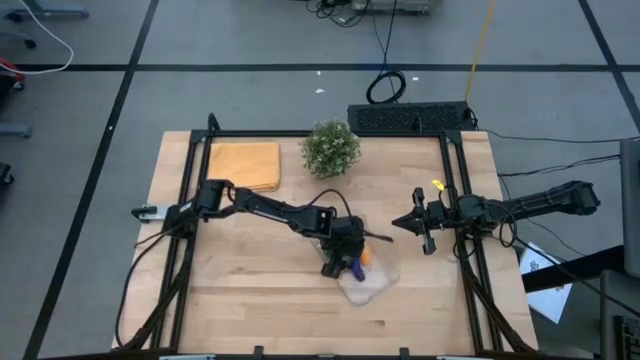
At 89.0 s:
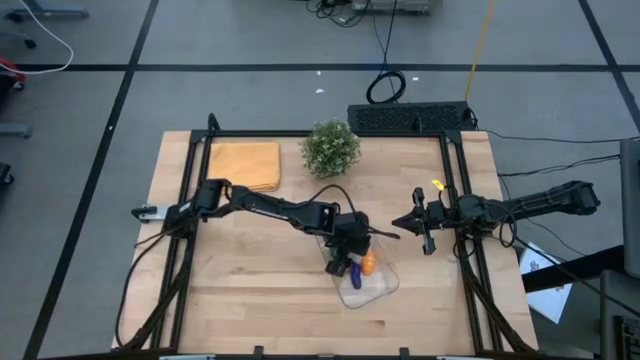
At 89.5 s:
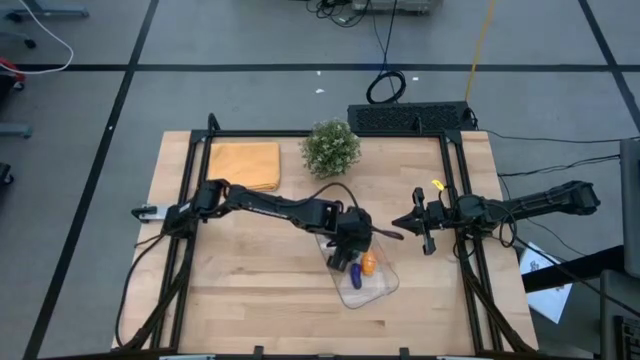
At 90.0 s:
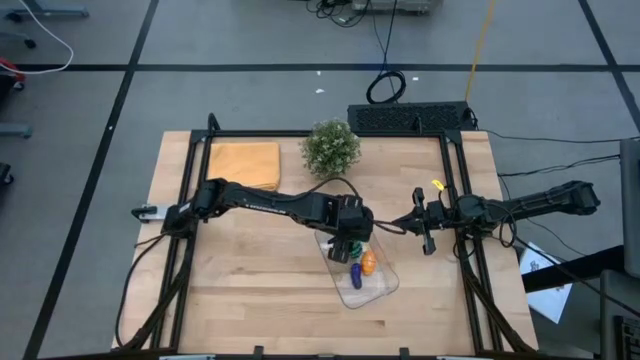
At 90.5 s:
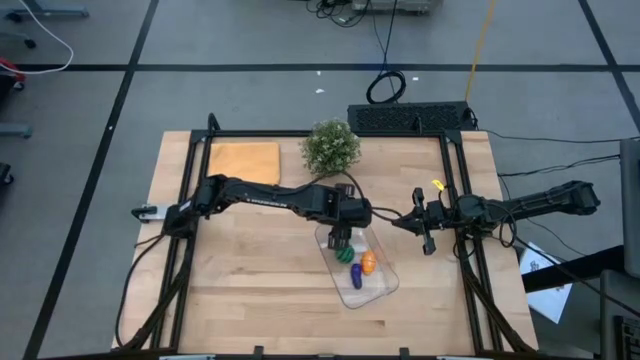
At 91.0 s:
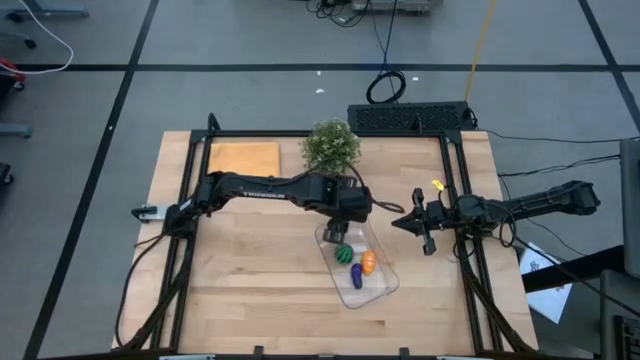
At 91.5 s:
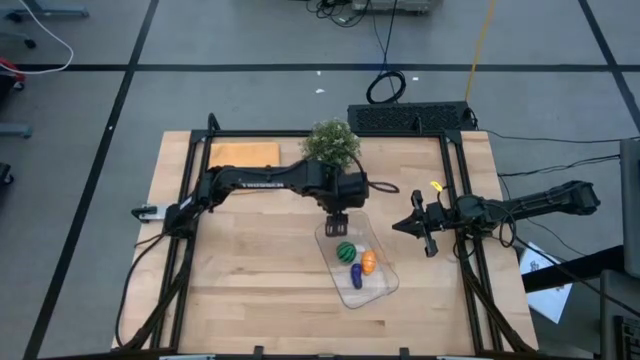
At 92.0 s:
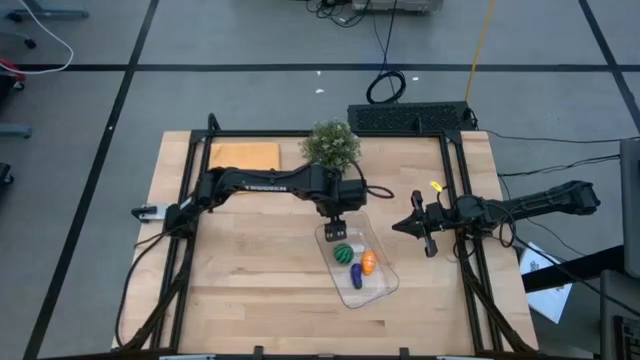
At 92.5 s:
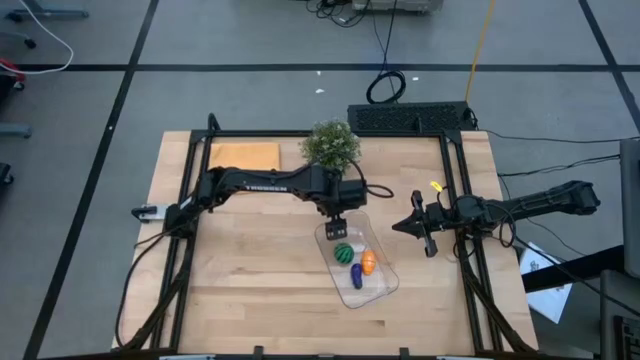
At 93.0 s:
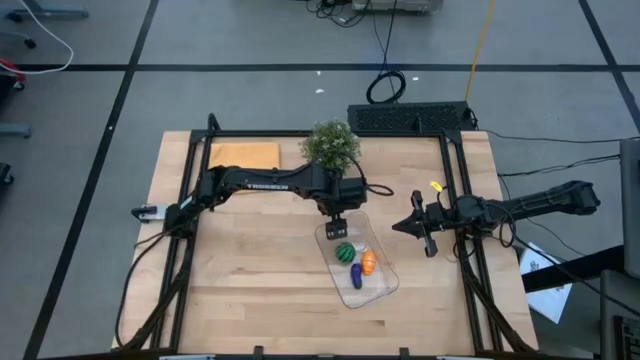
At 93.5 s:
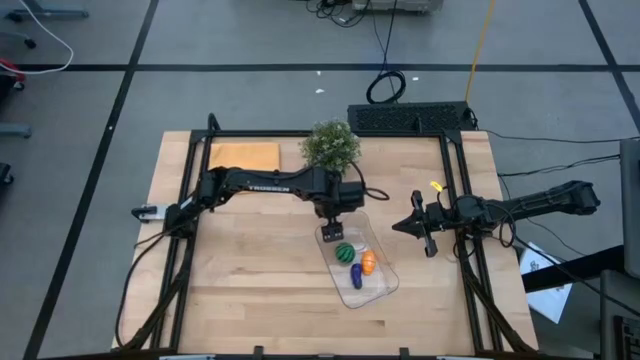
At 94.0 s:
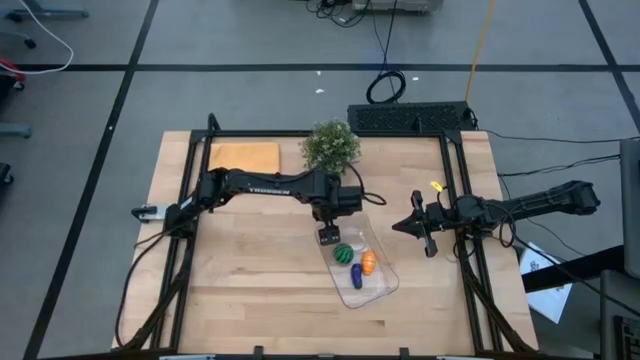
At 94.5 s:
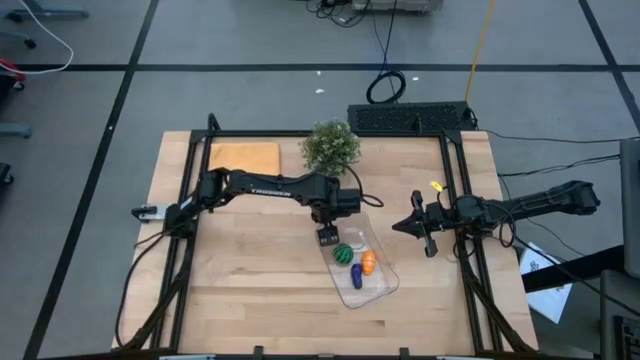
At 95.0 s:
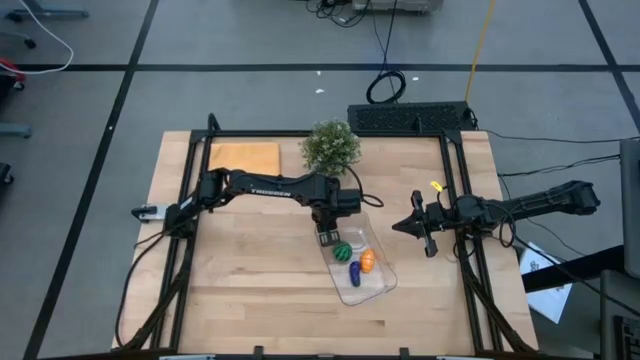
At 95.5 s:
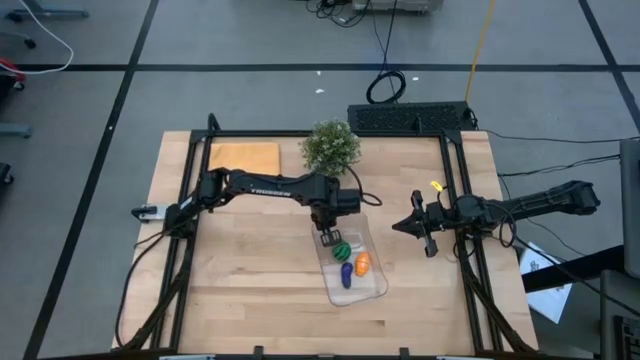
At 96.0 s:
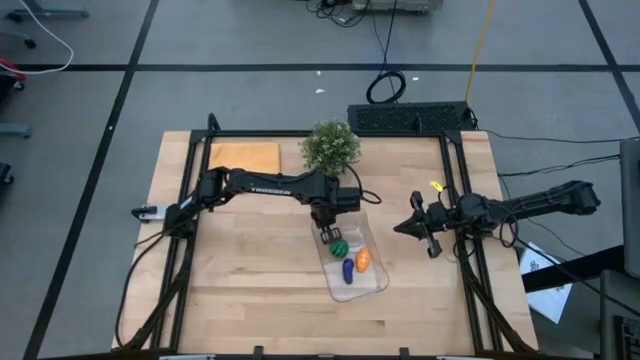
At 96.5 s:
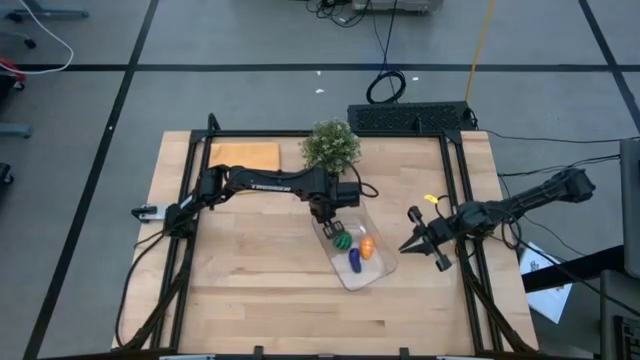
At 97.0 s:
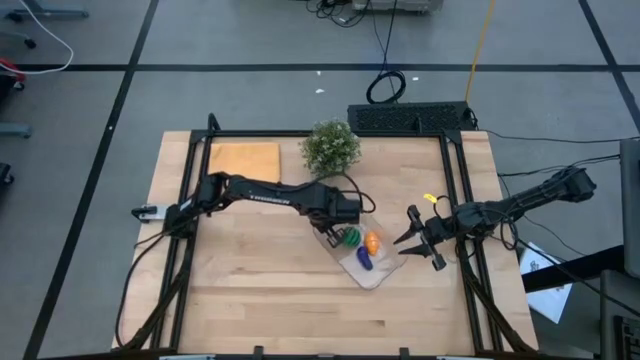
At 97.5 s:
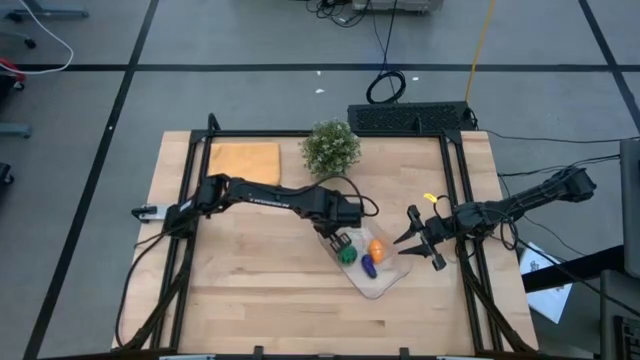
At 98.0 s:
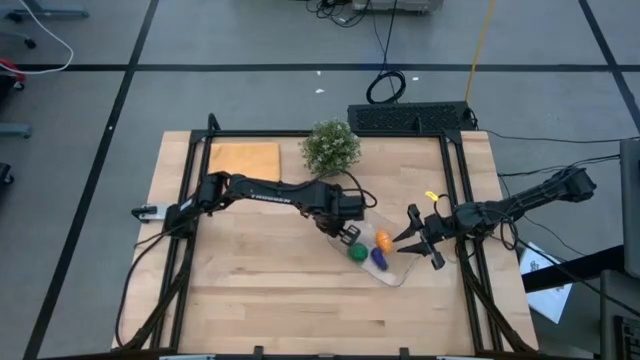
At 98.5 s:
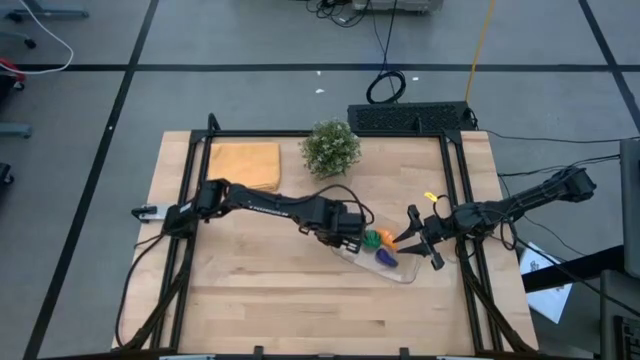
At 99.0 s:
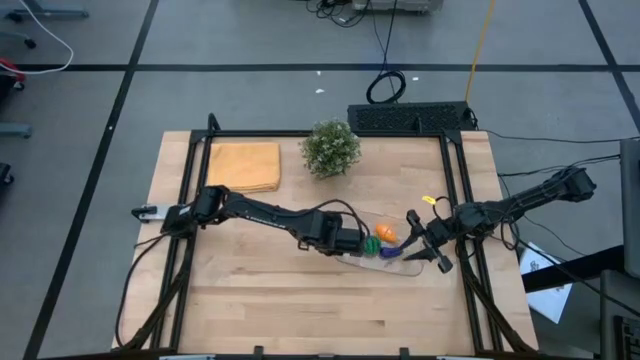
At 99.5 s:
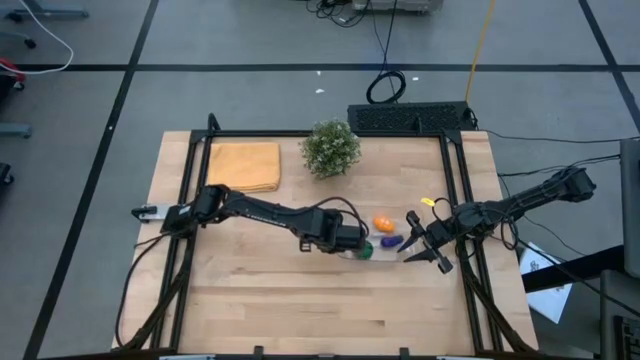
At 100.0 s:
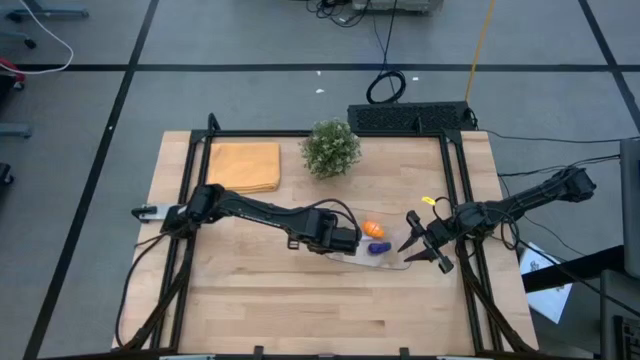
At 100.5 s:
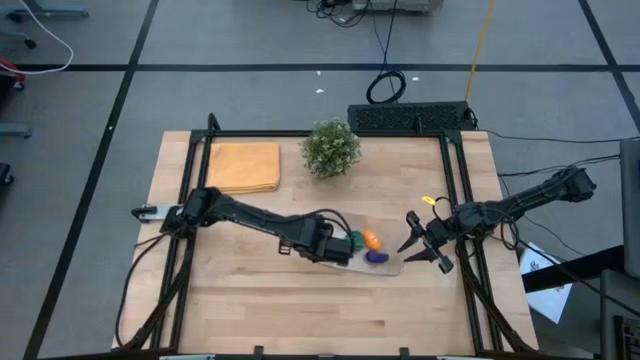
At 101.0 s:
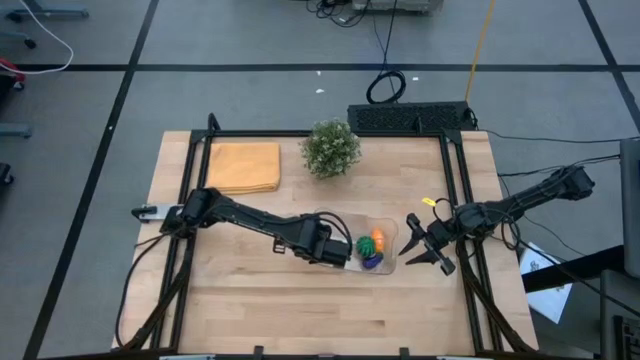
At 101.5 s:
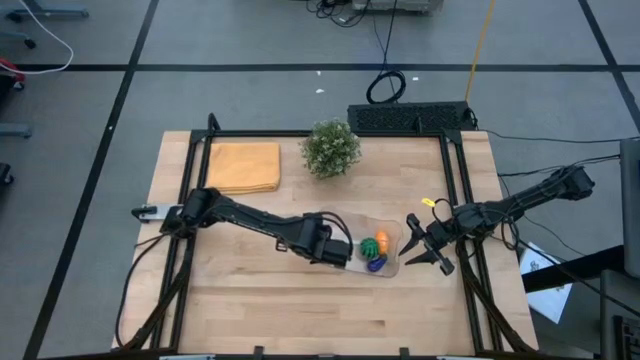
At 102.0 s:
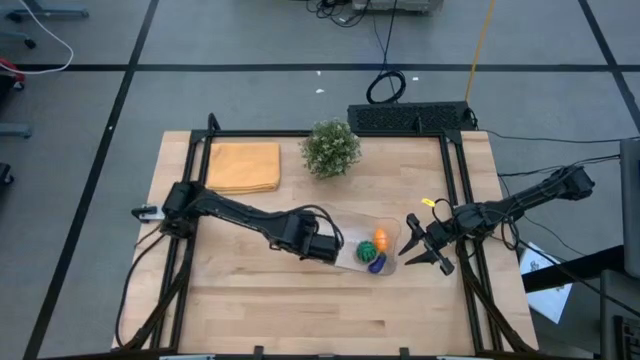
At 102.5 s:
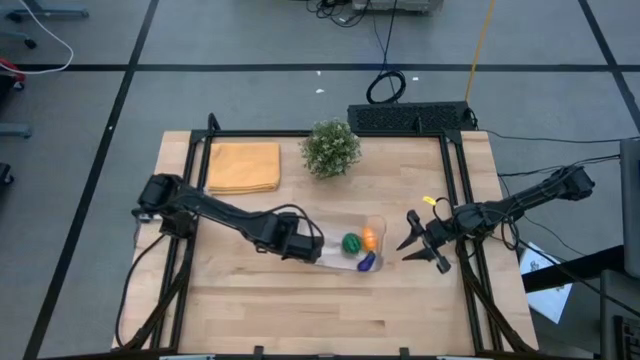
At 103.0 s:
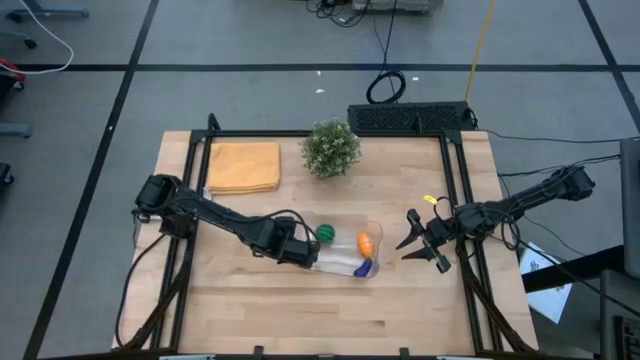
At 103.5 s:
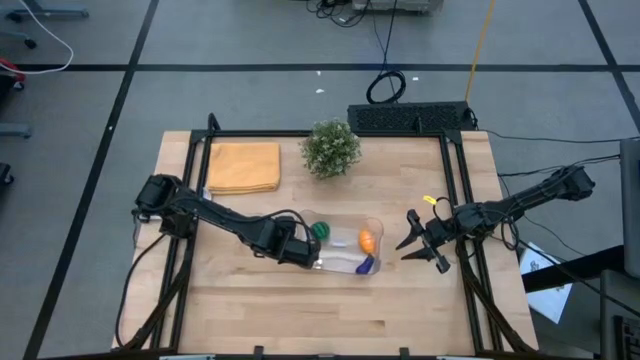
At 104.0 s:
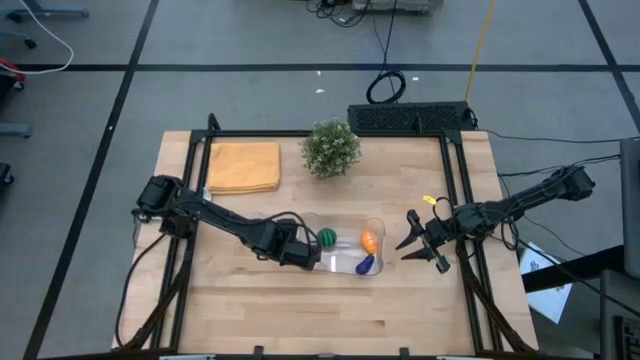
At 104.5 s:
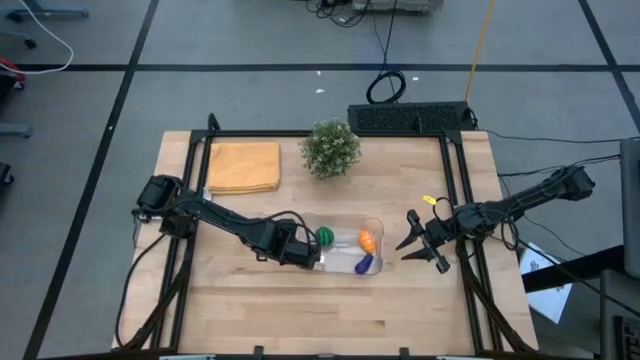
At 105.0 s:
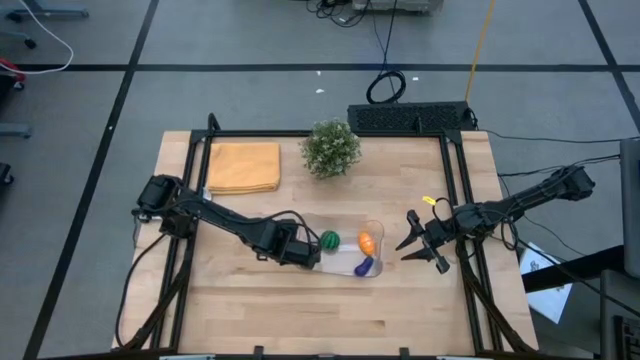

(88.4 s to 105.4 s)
Task: Pick and placing Produce into tupperware
Adjust the transparent bin

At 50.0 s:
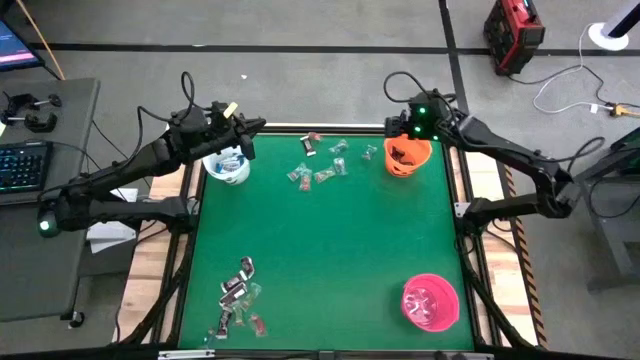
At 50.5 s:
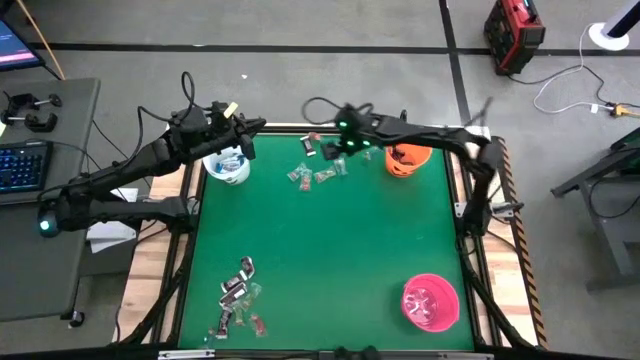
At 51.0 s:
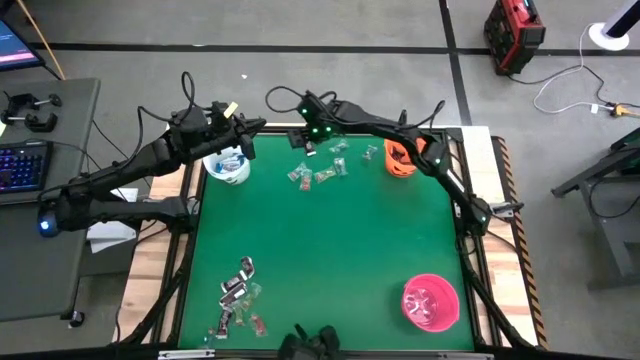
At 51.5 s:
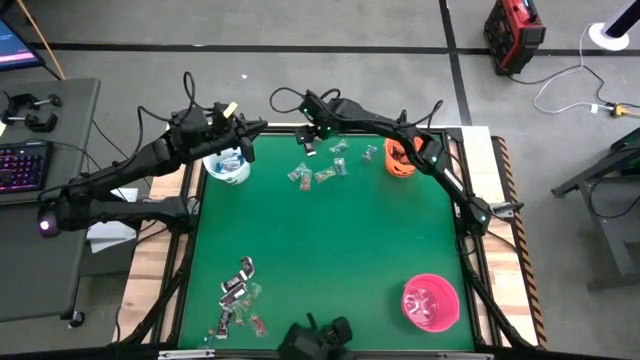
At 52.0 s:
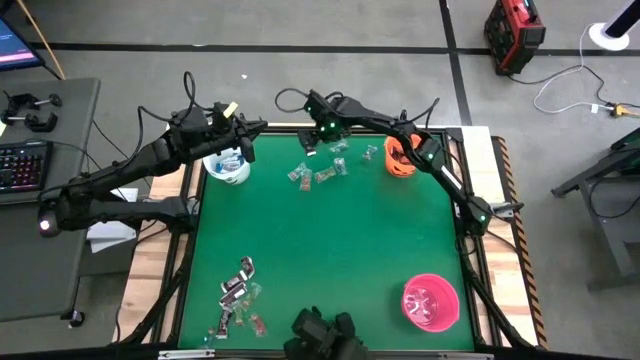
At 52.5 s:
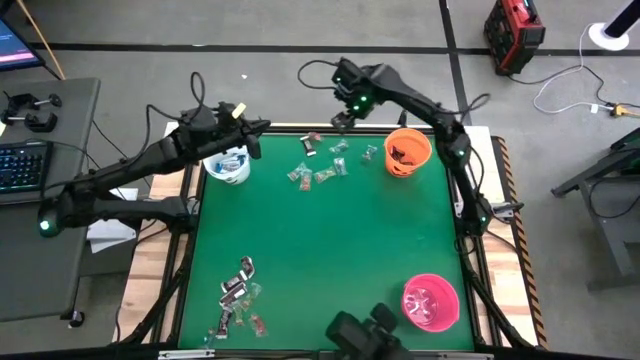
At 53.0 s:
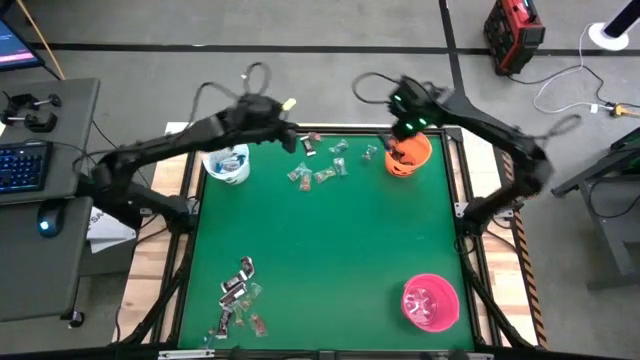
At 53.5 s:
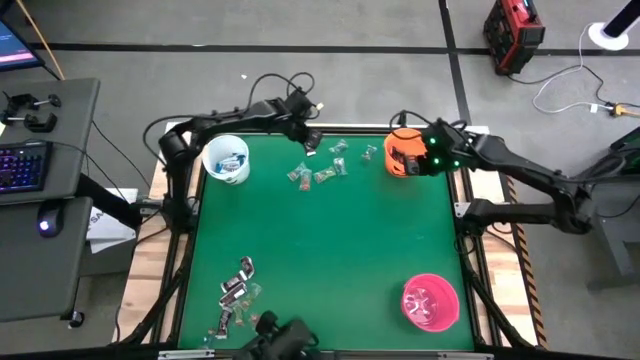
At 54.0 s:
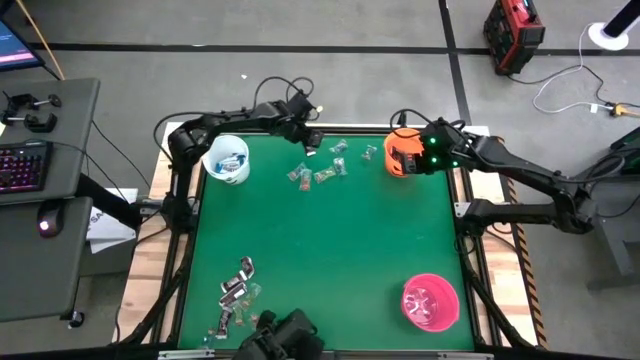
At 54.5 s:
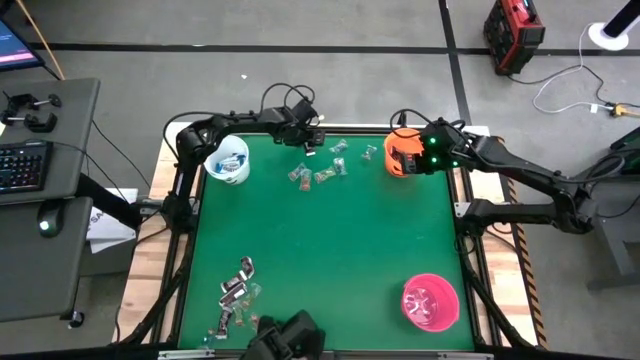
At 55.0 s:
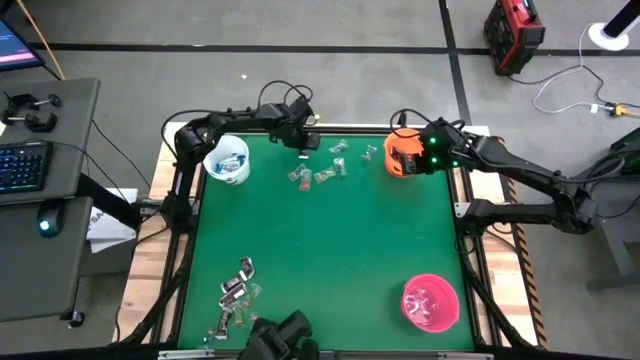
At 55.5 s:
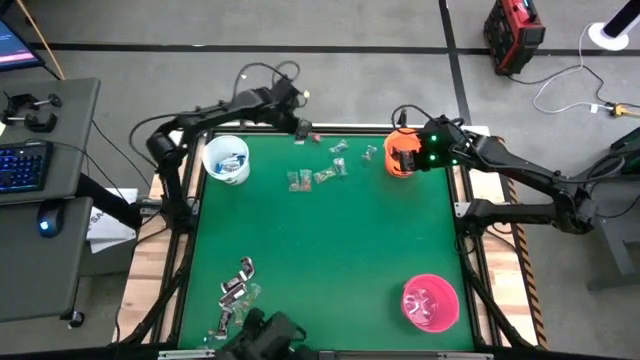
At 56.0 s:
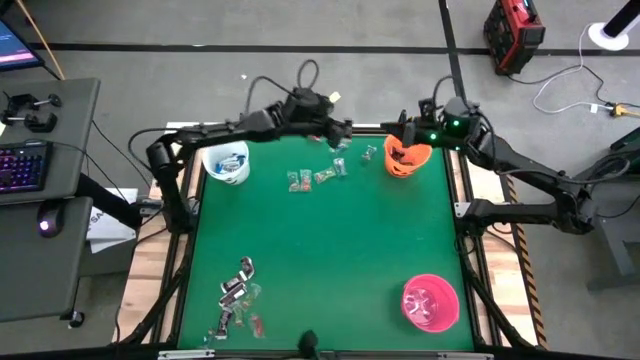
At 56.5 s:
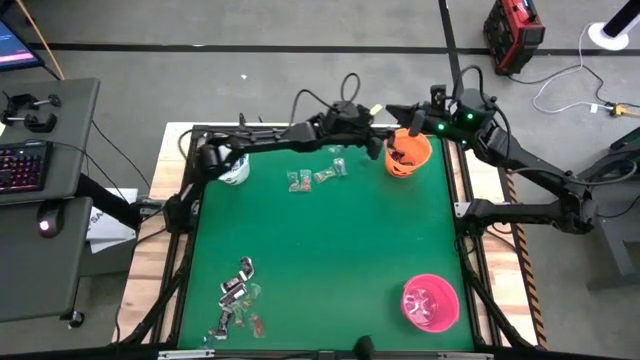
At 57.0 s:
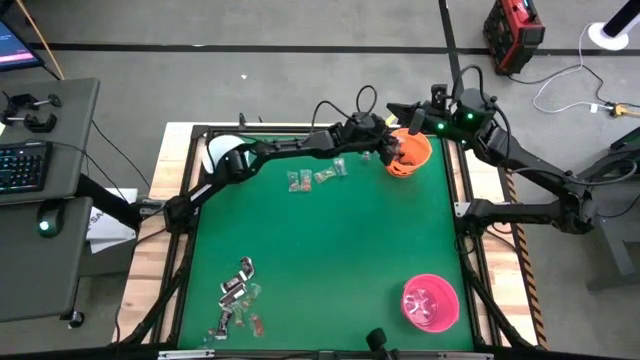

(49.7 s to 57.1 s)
Task: Sort candy by brand, put in halloween buckets
Put the brown chocolate bar into the orange bucket
